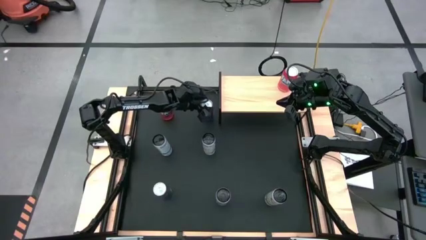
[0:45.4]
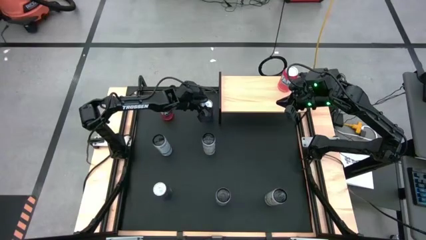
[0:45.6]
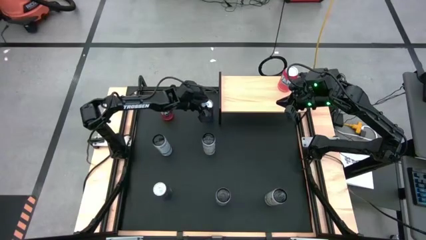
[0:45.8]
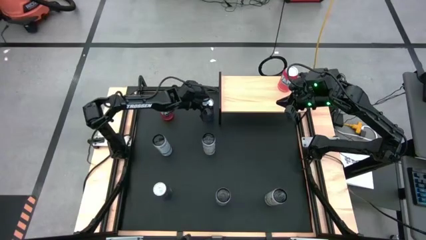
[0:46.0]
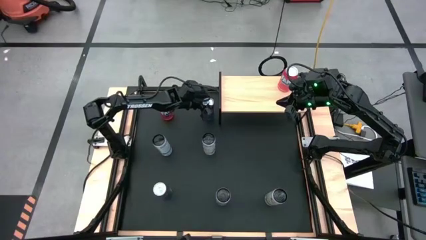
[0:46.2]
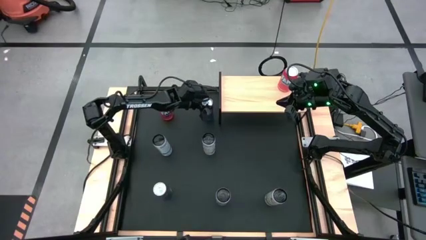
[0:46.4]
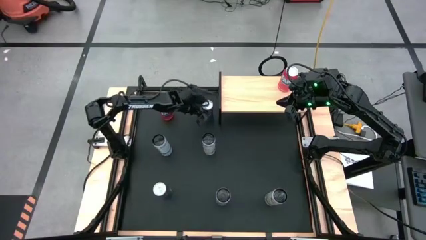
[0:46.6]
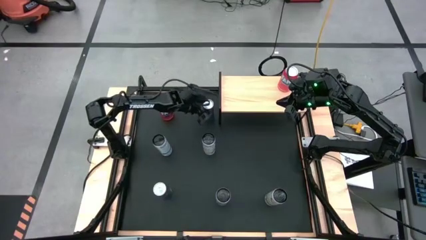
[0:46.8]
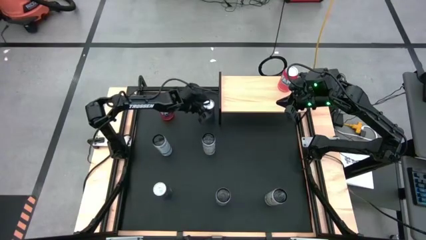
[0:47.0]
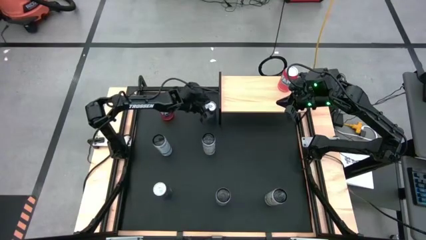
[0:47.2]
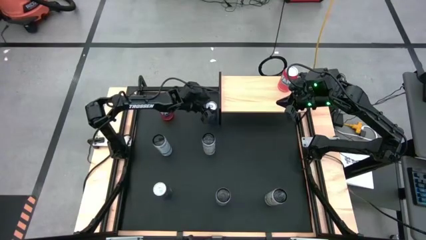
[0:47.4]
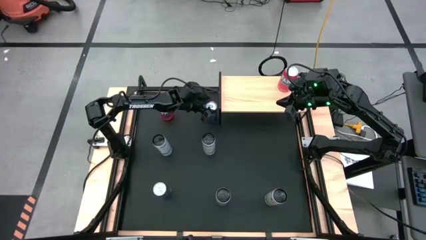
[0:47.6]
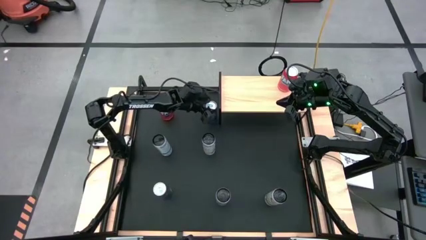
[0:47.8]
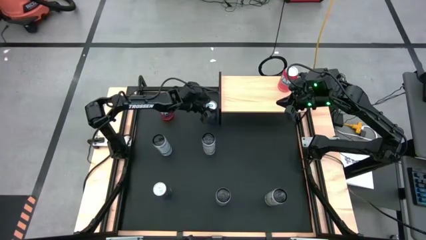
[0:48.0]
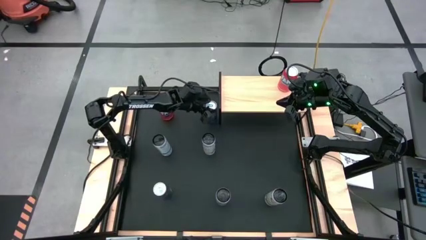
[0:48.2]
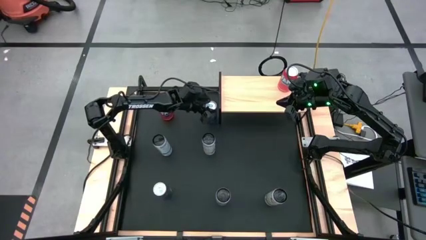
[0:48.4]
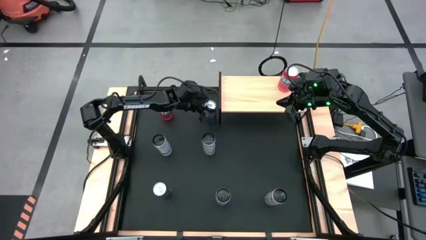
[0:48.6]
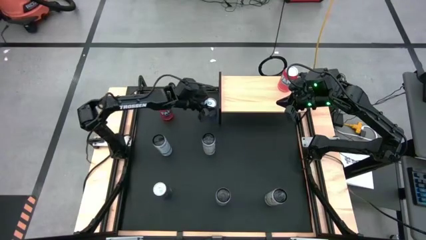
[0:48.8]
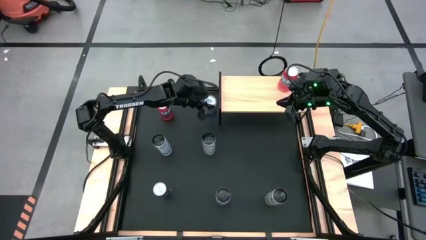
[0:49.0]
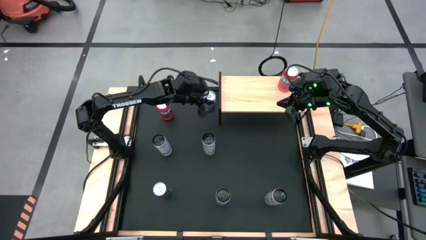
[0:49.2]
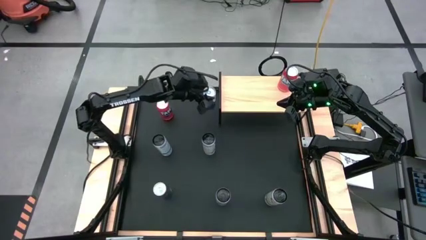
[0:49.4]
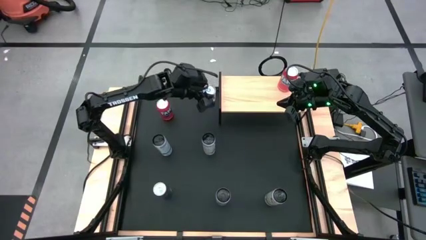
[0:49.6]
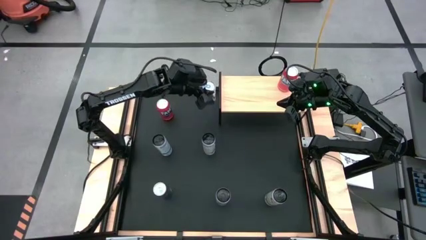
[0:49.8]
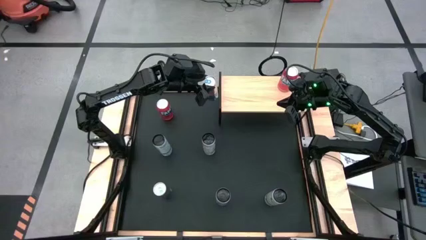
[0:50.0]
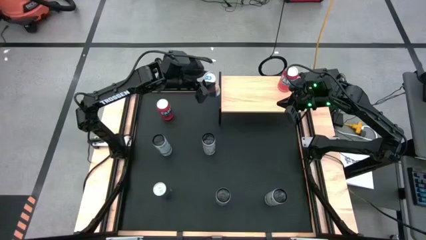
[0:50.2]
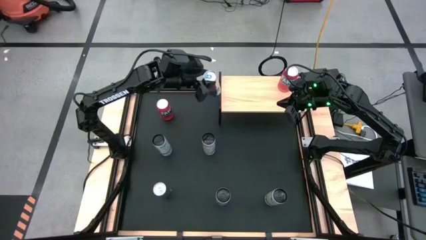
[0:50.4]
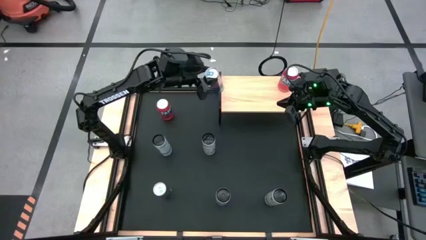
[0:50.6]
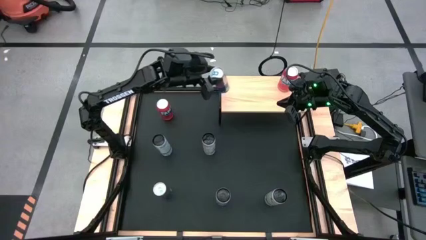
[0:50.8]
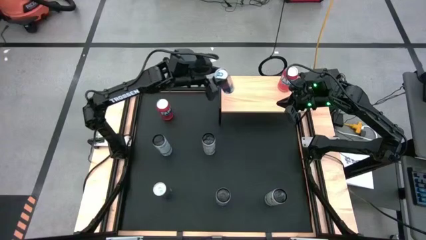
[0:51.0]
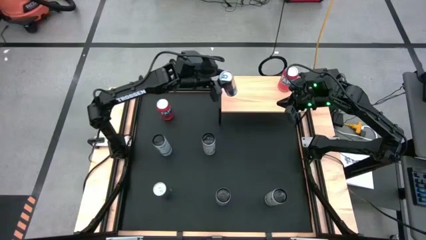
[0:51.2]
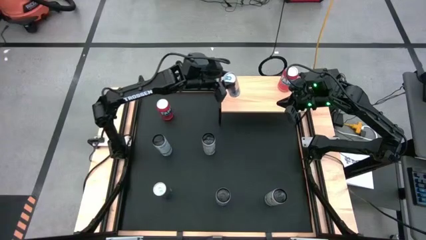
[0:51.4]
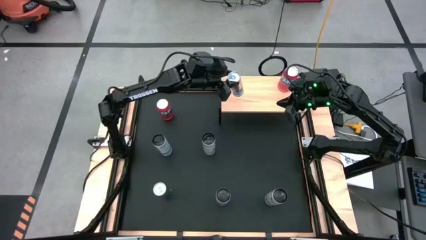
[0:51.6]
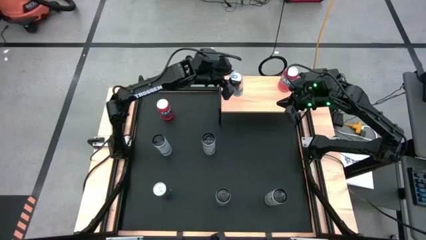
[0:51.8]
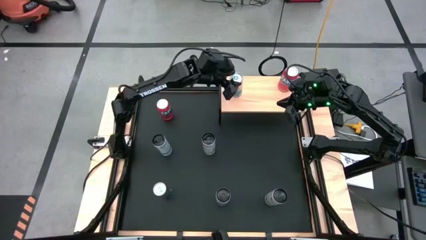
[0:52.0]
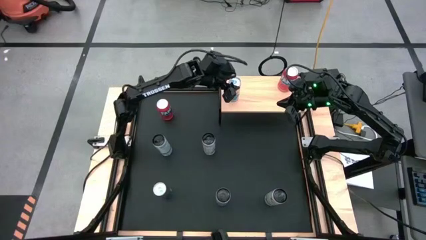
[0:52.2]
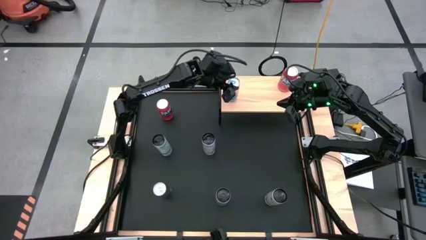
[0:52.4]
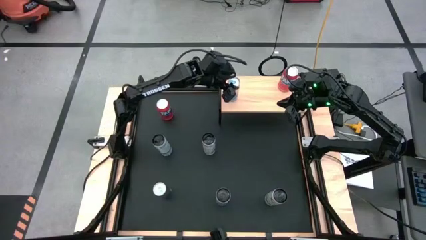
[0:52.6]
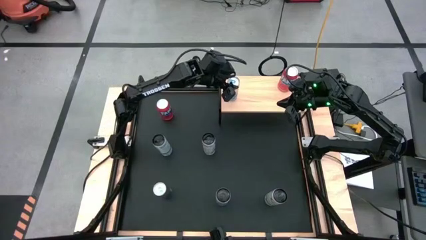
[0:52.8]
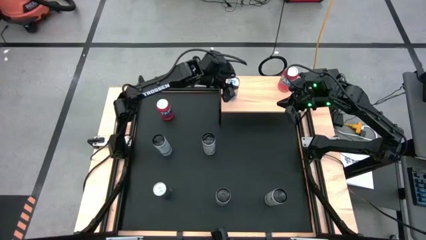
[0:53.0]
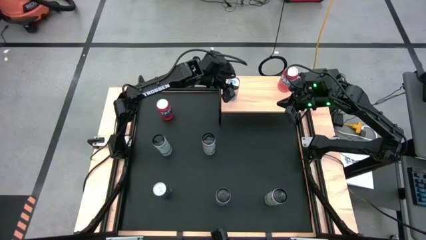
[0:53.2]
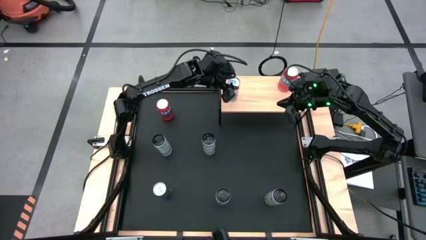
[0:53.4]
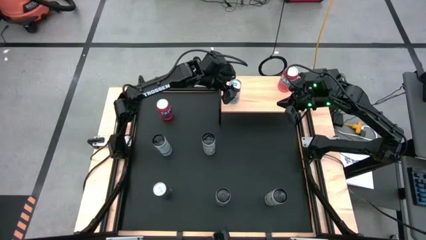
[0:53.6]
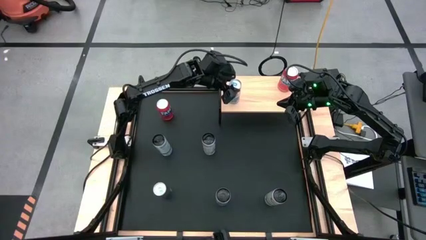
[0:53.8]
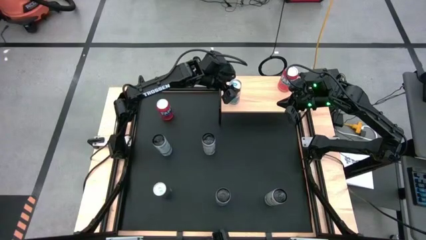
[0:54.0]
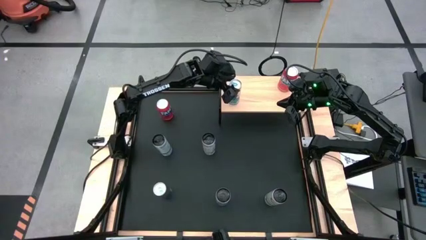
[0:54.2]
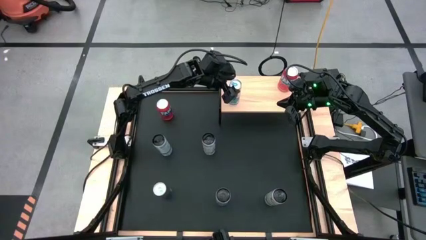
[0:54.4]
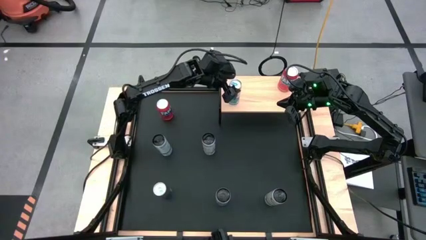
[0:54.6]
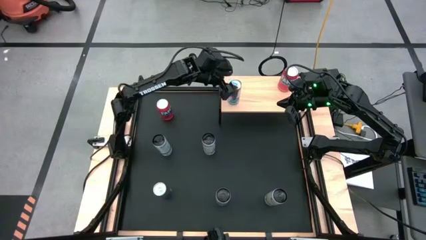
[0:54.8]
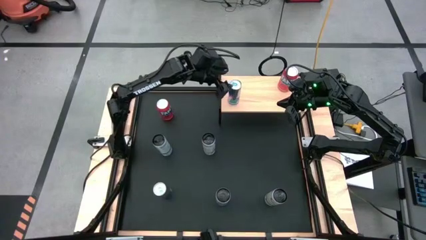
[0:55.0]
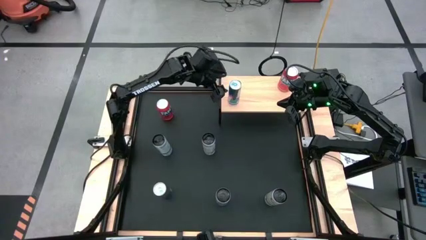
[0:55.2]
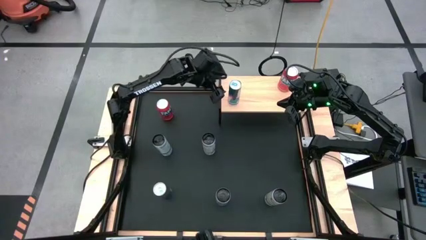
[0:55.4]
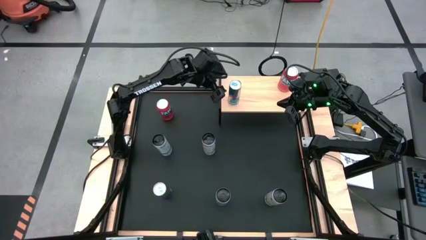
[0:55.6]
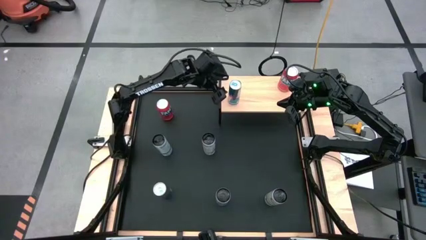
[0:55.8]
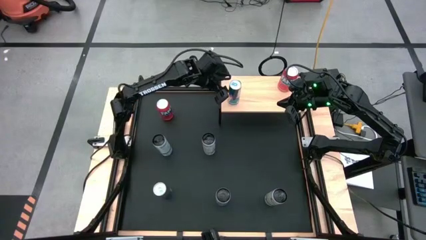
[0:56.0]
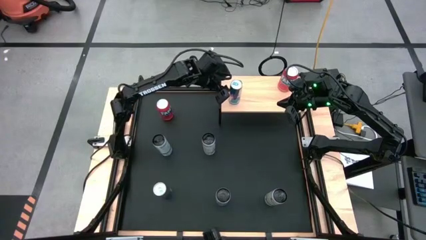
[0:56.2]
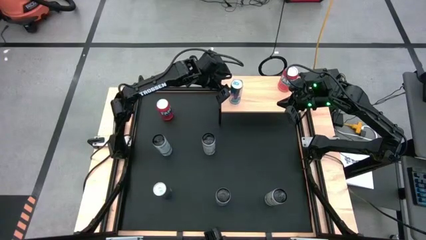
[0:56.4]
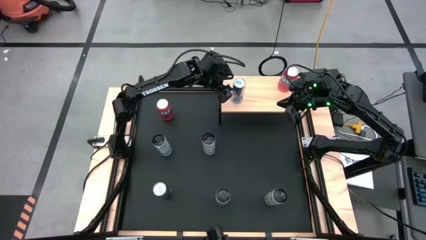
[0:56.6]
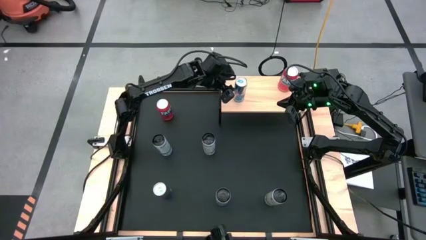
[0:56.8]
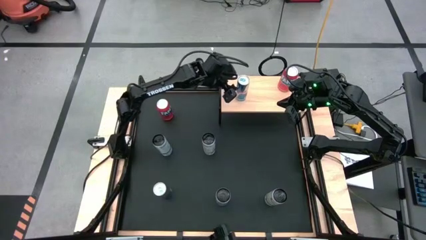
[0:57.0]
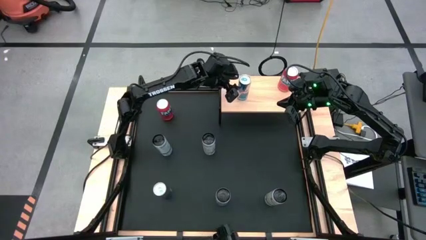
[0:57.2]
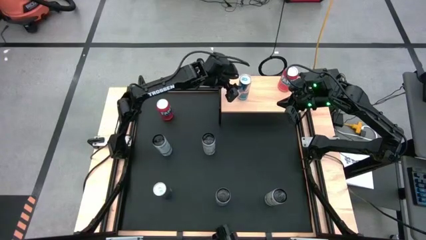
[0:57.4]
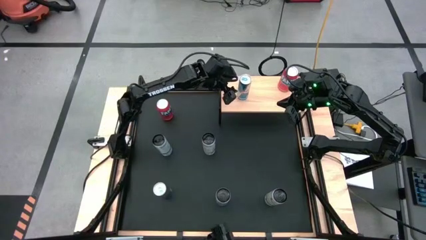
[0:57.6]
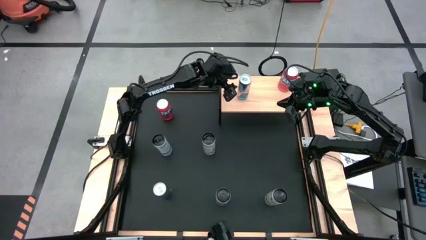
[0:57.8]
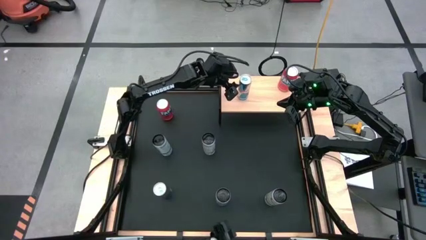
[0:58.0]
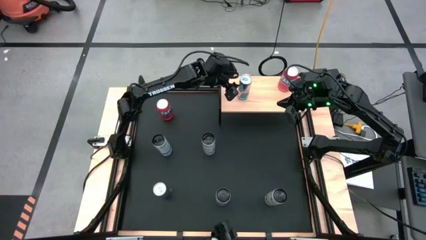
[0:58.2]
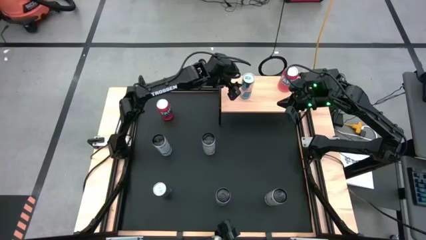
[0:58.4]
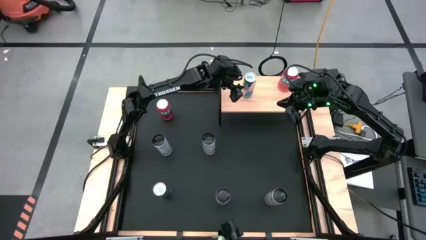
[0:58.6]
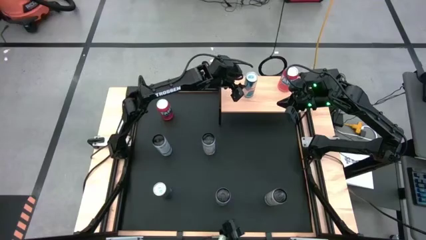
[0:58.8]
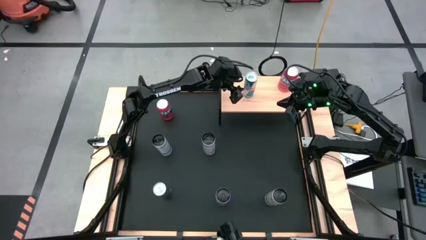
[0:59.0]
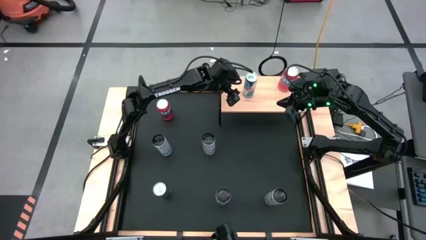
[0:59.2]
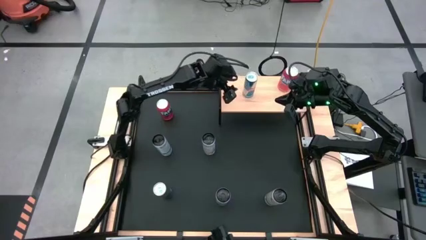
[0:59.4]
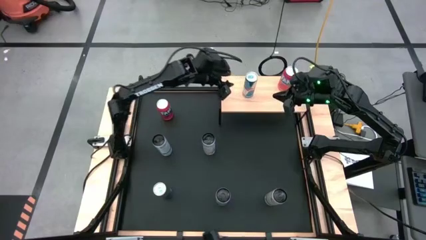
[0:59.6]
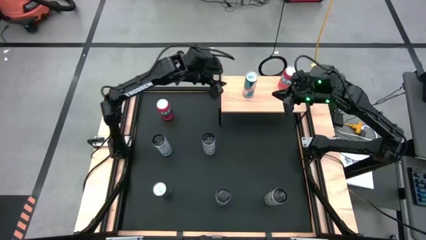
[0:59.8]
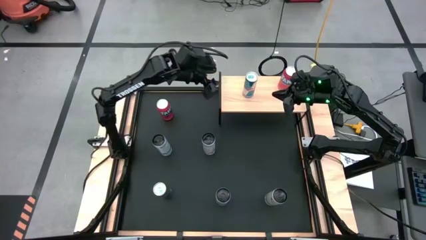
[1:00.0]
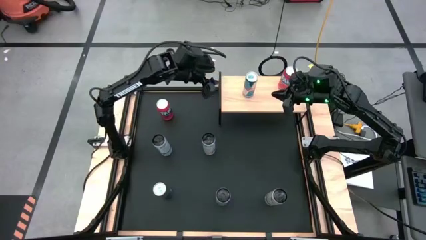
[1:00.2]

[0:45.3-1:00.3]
Task: Place canned beverage on shelf
Put the top blue soda can on the shelf
